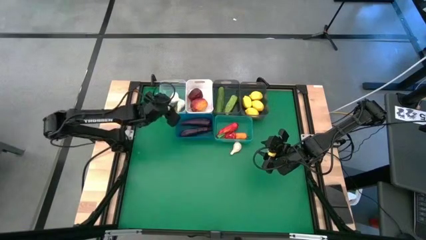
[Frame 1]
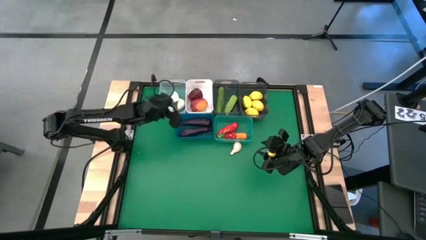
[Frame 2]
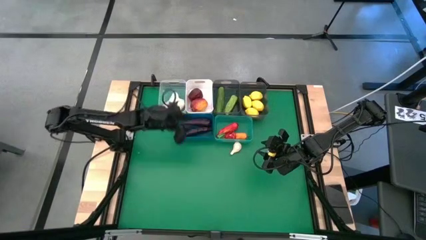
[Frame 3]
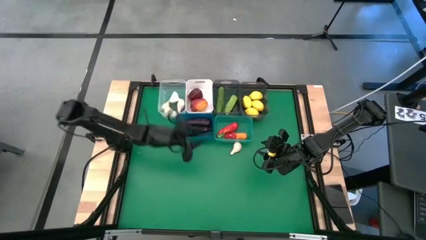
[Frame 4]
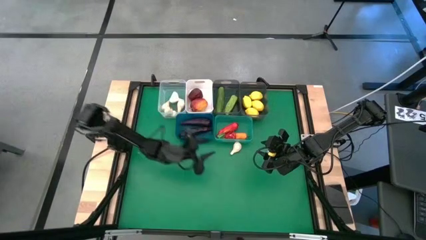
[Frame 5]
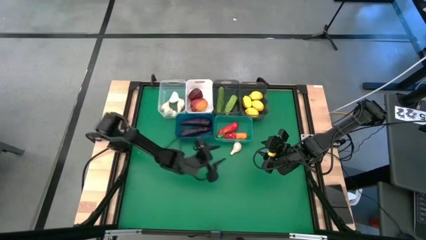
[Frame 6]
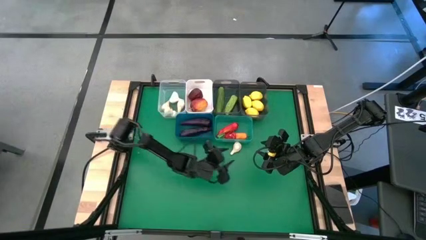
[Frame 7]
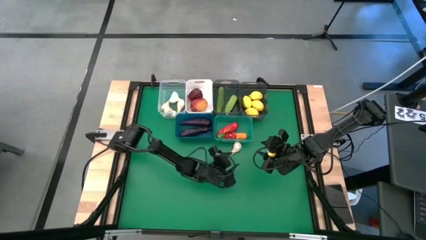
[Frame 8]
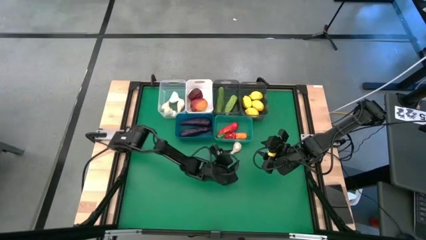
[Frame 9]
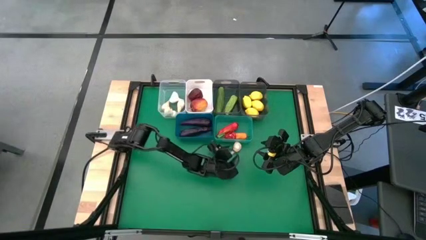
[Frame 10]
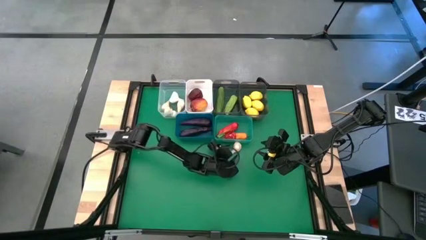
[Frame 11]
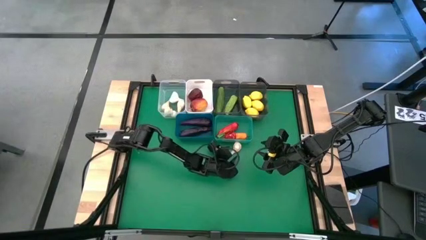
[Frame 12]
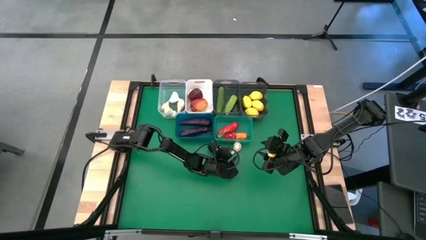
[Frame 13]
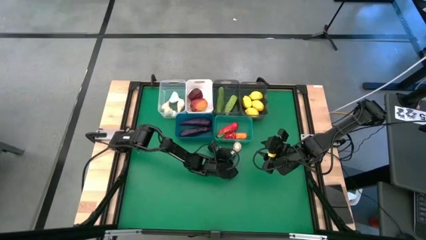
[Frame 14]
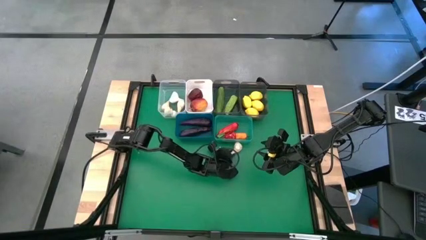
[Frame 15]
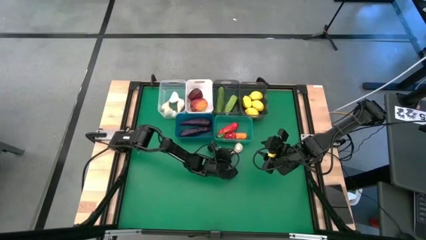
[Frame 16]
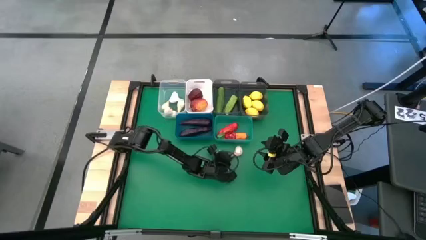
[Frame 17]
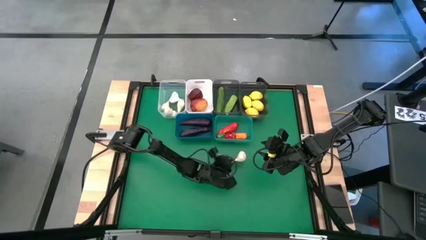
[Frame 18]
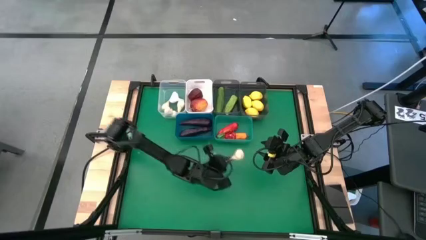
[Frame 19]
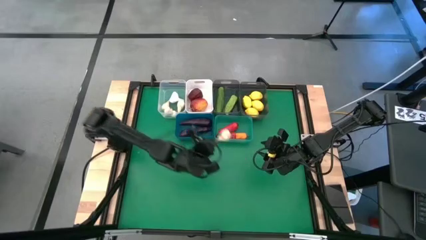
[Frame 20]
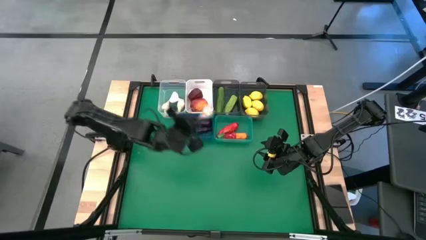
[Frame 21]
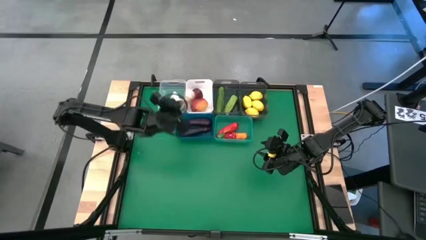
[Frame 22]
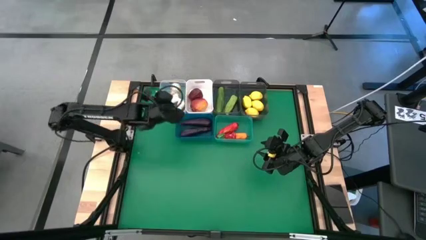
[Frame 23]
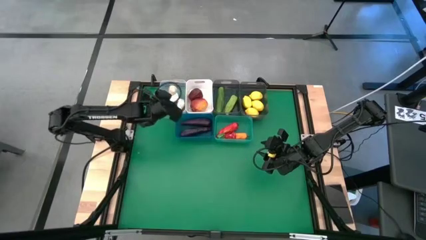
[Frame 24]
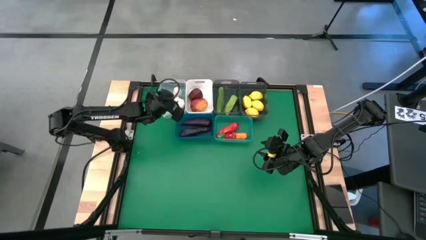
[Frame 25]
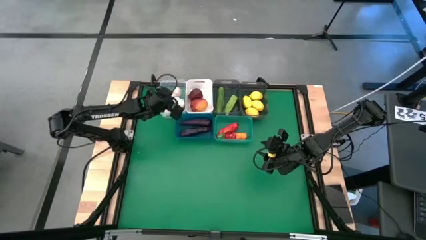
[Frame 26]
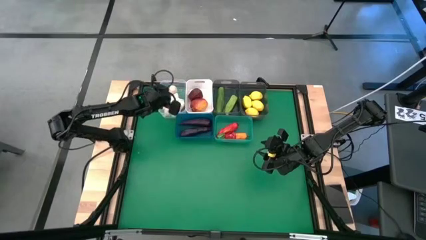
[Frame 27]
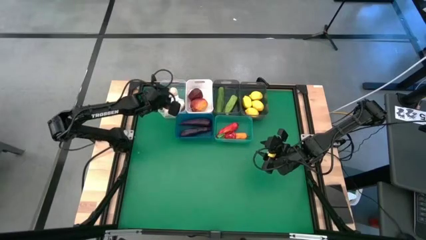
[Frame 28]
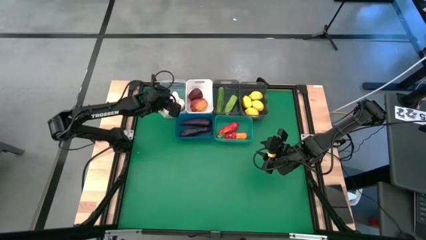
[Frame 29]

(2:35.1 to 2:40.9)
Task: Sort produce into baskets
Put the garlic into the transparent bin

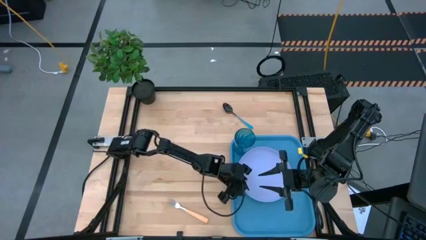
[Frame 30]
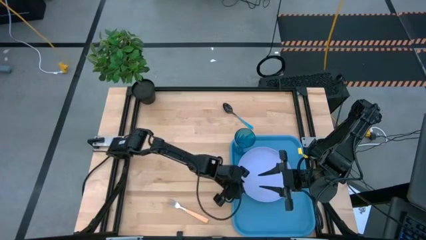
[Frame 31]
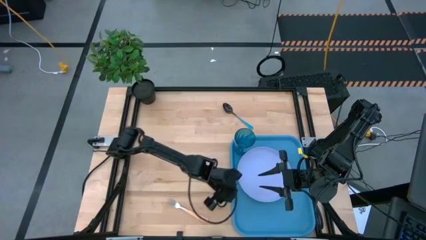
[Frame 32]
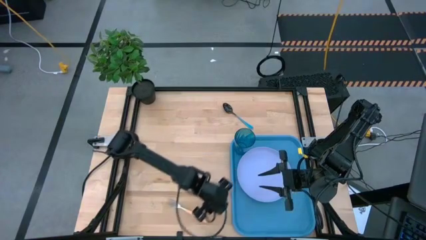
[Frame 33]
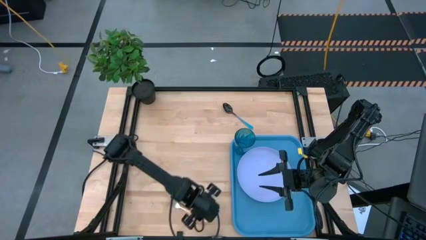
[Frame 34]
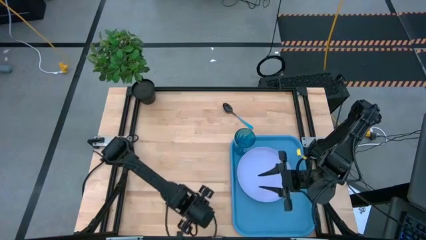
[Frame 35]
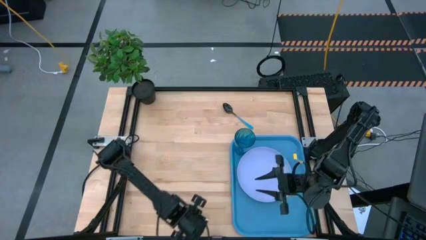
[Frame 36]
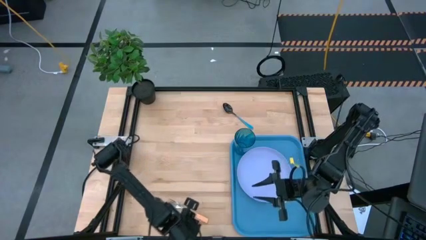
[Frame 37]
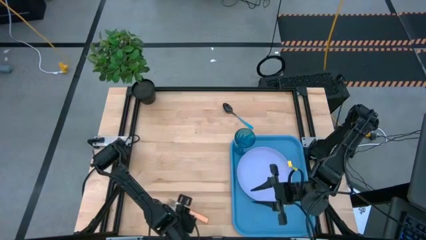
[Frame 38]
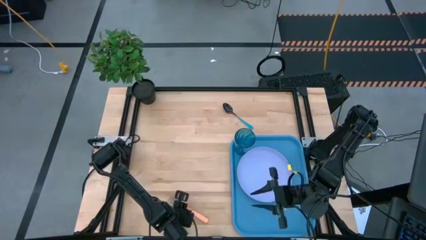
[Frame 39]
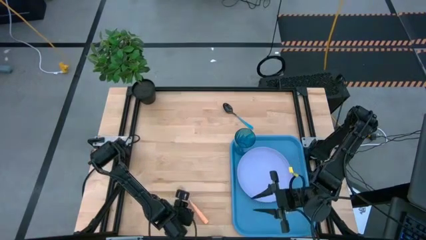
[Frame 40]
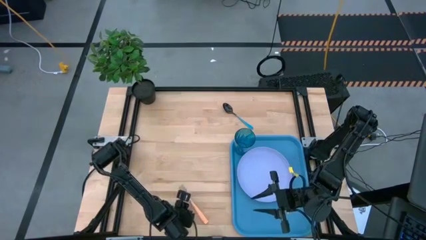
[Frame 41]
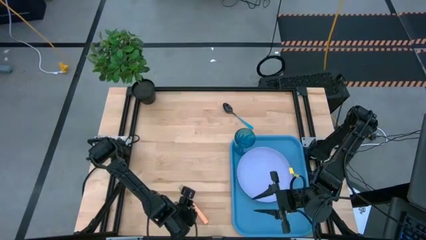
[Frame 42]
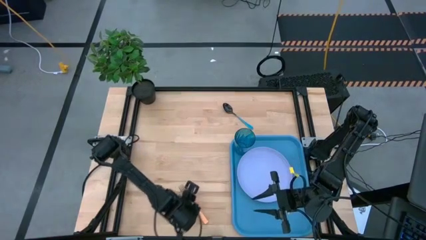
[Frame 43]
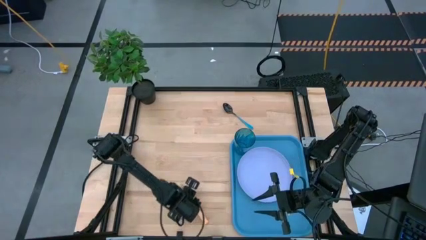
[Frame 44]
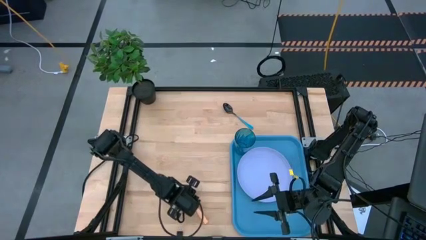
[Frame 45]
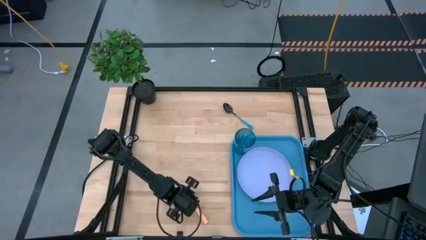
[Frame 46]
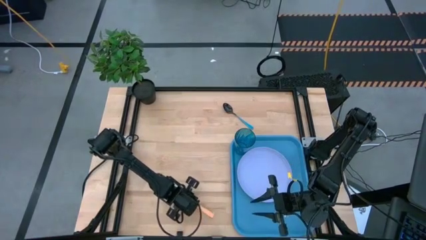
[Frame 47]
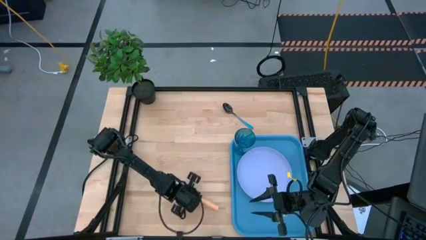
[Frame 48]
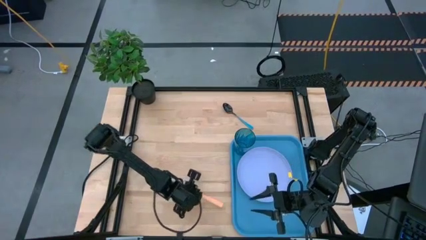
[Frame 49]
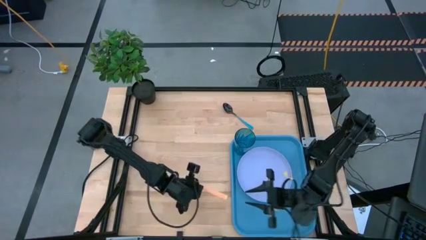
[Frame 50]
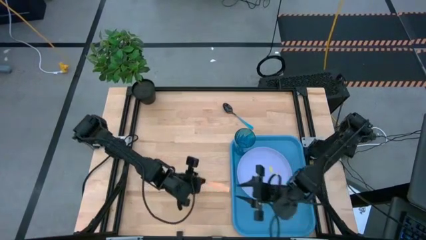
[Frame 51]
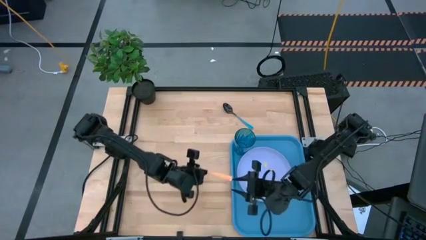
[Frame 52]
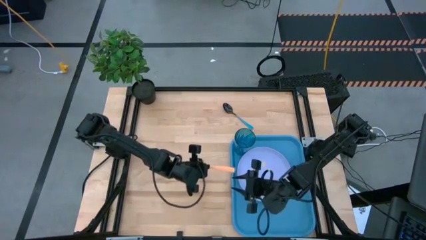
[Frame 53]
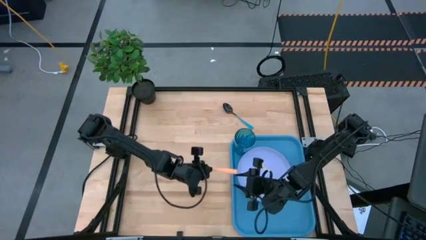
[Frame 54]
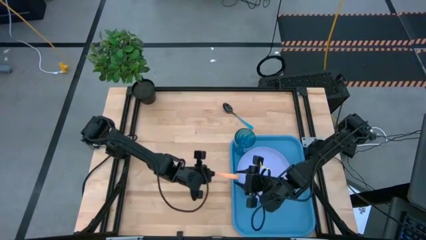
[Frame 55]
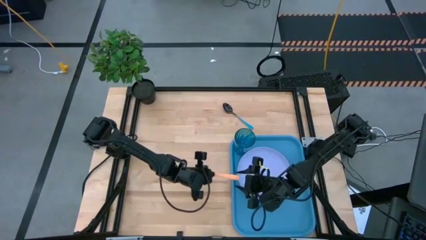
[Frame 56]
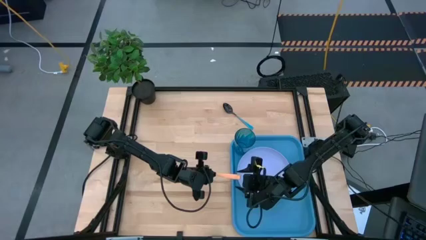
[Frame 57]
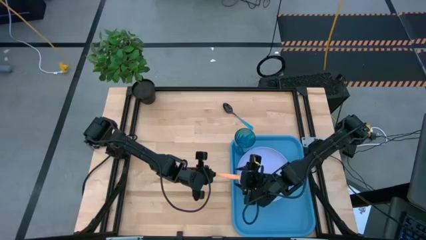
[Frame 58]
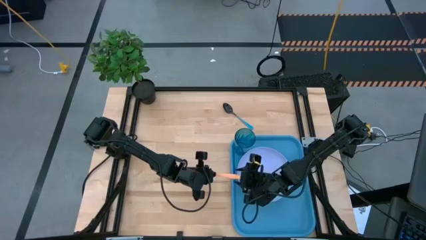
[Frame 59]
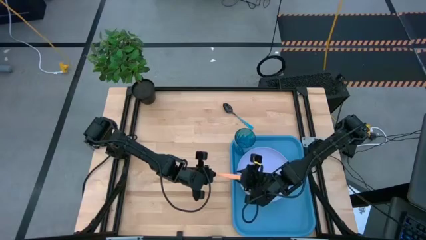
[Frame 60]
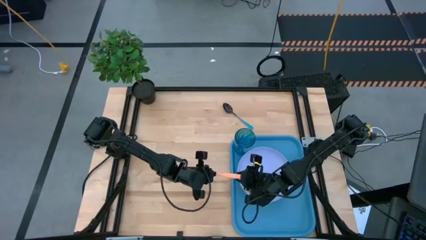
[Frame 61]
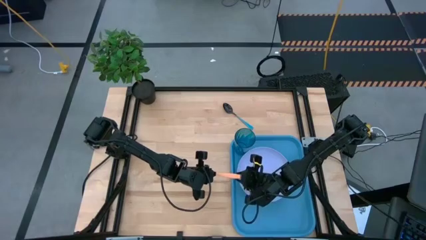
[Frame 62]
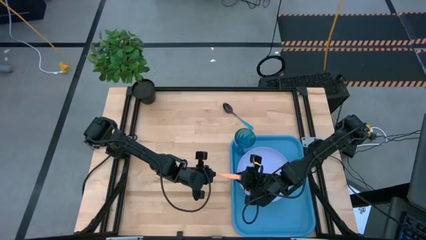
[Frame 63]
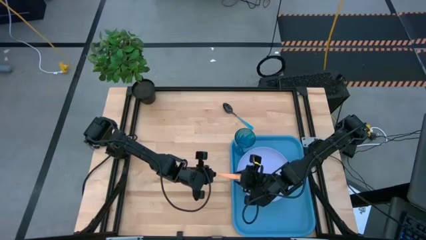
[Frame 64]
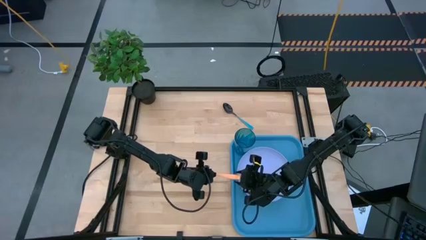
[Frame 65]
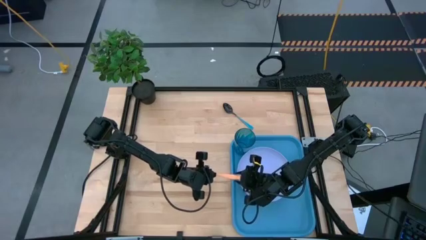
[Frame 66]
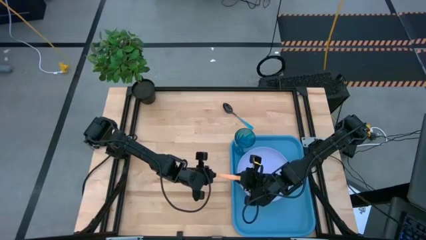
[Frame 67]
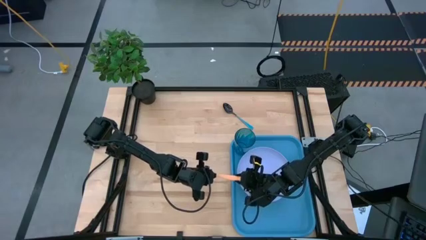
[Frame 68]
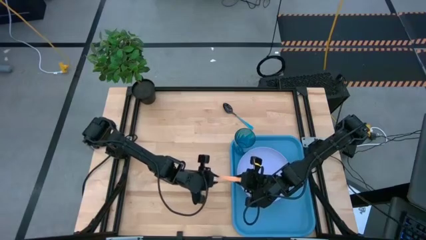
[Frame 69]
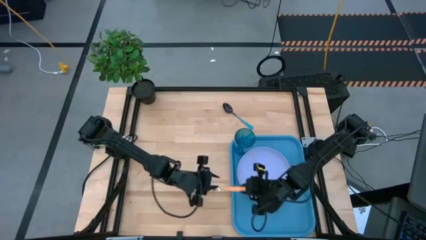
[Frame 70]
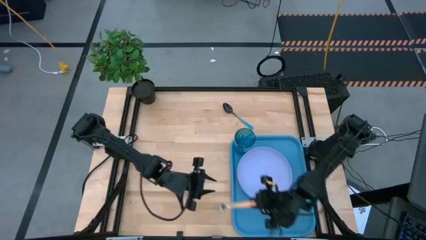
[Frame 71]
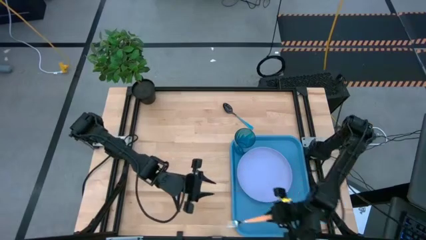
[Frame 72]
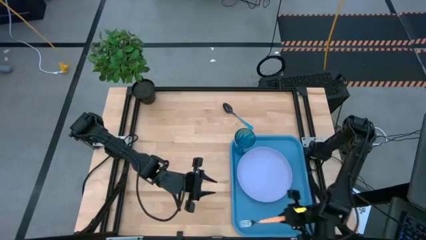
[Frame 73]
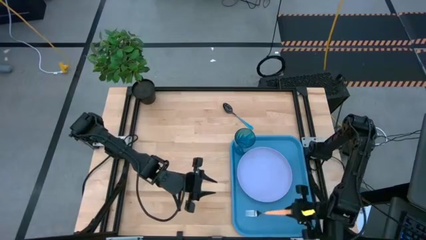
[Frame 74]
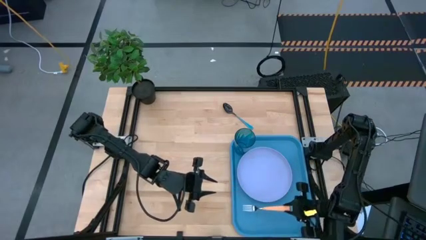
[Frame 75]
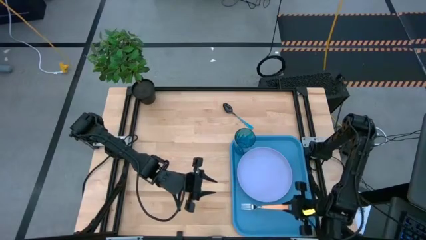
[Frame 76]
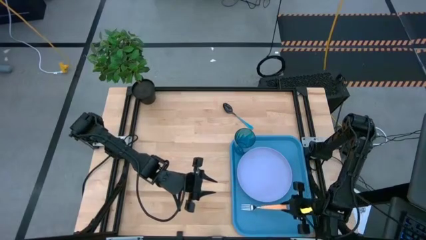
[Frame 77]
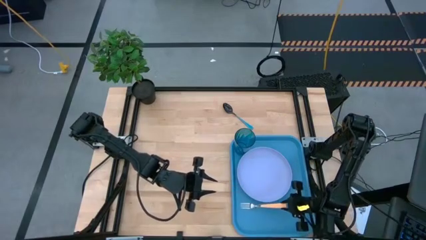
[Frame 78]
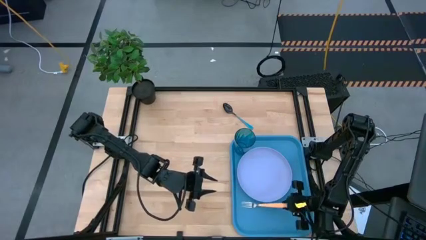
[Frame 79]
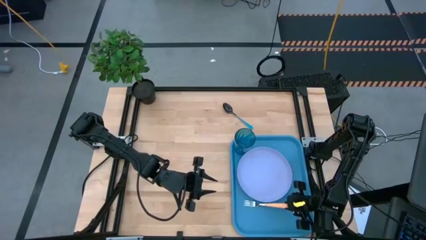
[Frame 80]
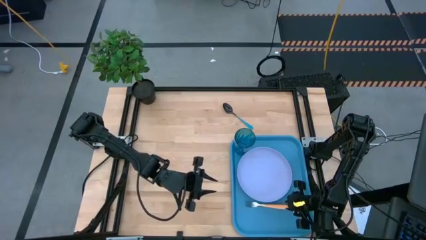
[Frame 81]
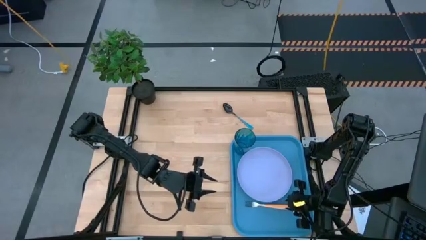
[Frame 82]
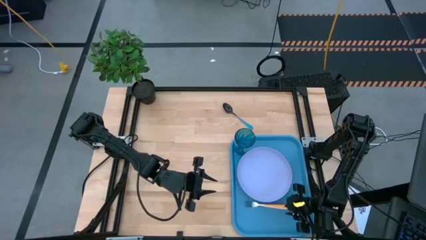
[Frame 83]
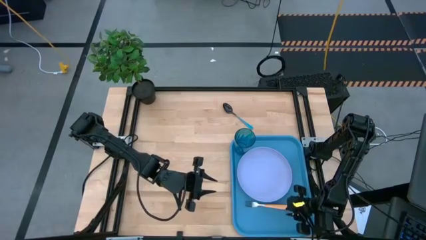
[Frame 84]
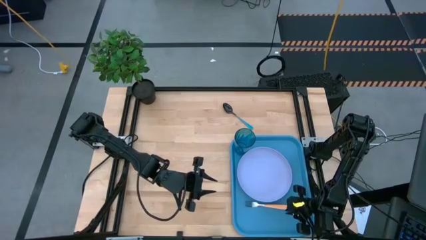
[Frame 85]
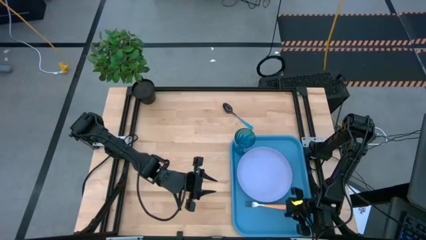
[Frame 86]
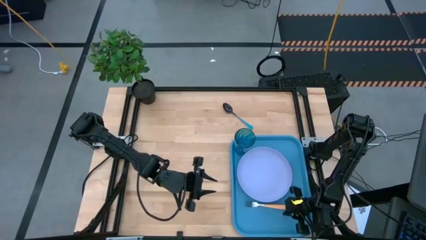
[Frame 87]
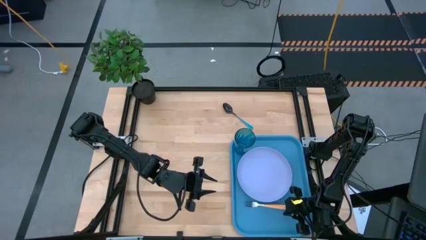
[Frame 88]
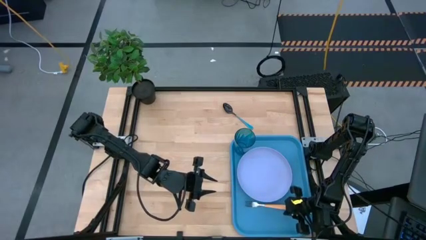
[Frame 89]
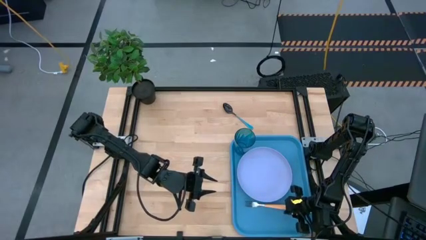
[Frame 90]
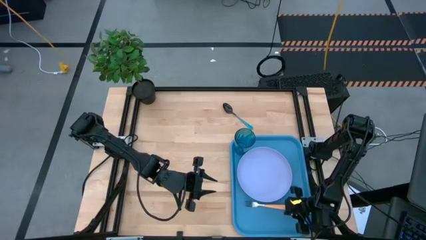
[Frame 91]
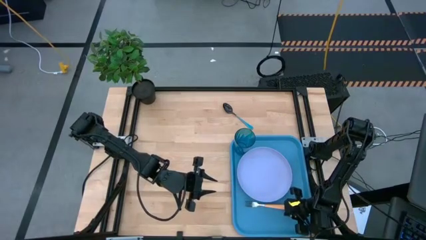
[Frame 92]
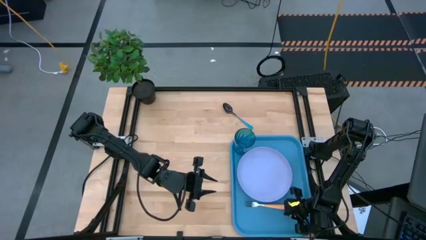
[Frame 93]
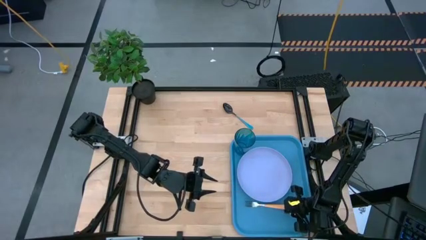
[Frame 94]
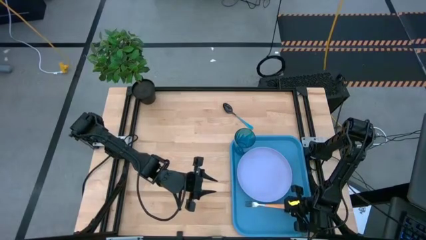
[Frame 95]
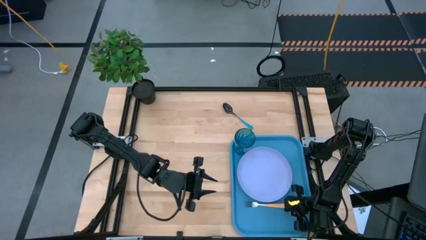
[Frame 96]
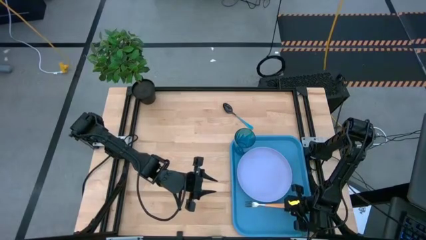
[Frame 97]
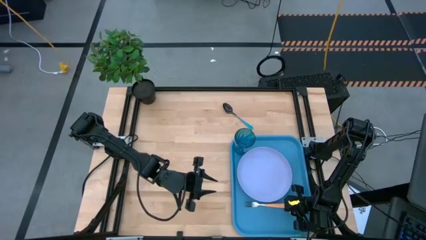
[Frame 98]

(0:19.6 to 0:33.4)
Task: Pick and place plate/cup/fork/spoon on tray
Put the orange fork on the blue tray at the left side of the purple plate
